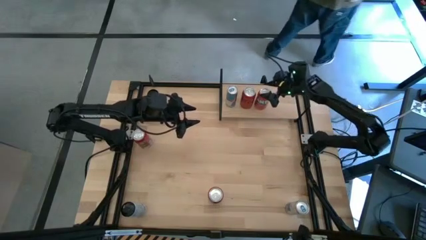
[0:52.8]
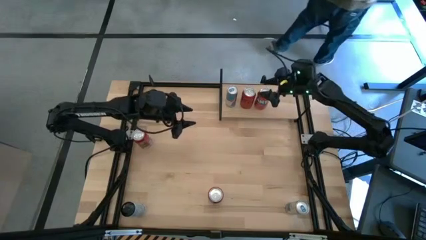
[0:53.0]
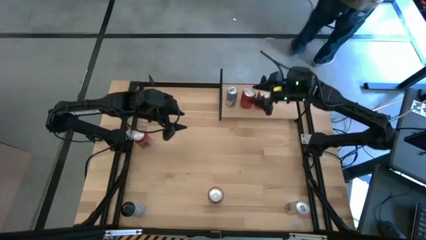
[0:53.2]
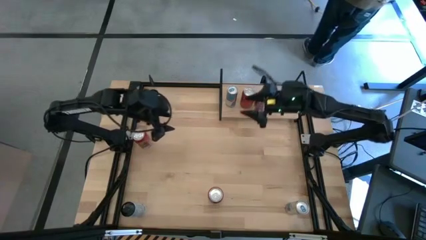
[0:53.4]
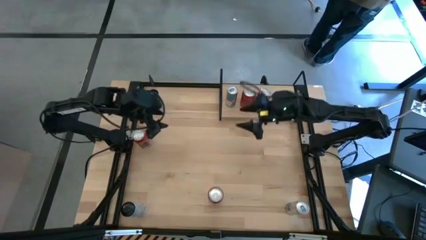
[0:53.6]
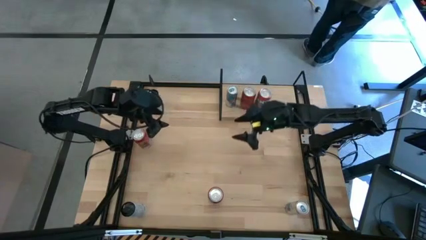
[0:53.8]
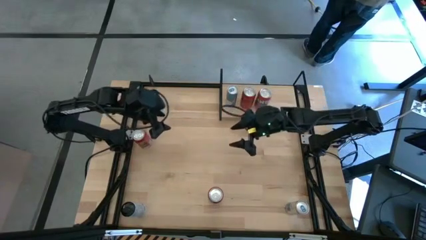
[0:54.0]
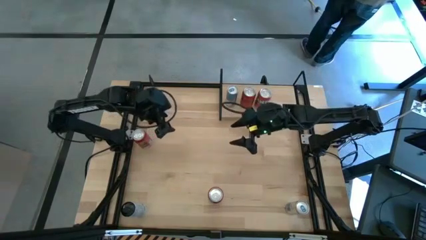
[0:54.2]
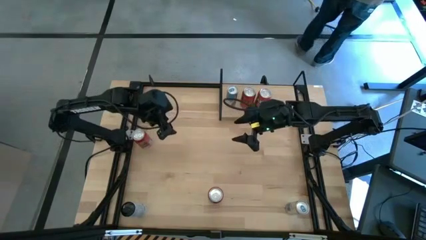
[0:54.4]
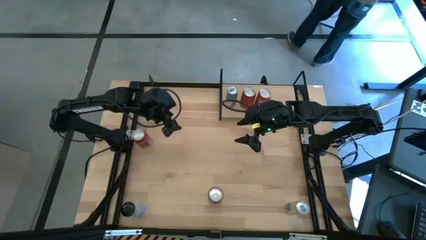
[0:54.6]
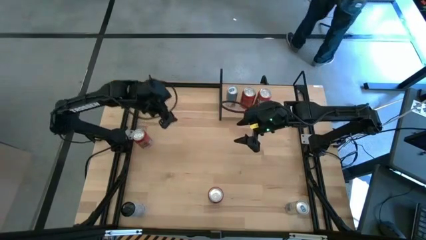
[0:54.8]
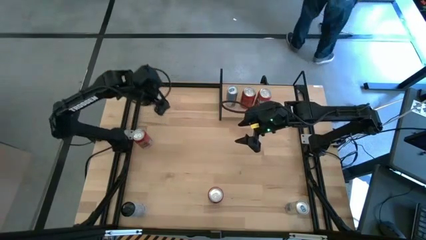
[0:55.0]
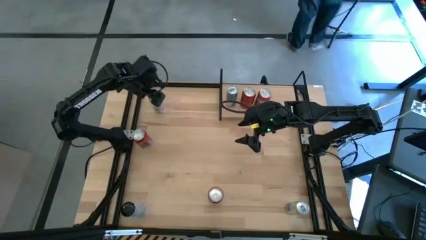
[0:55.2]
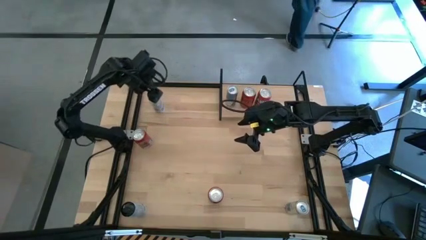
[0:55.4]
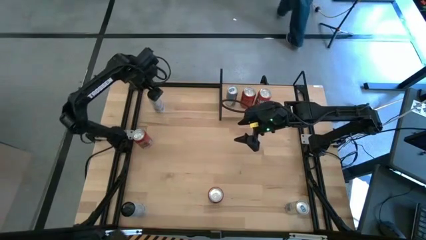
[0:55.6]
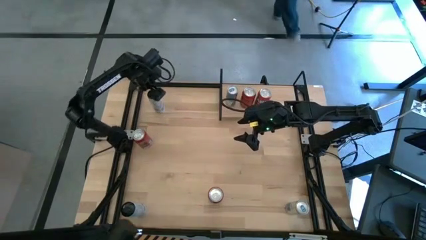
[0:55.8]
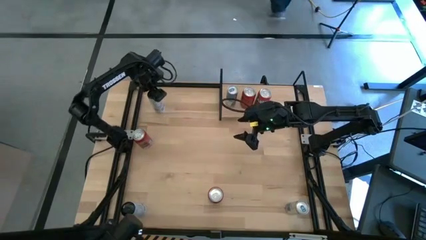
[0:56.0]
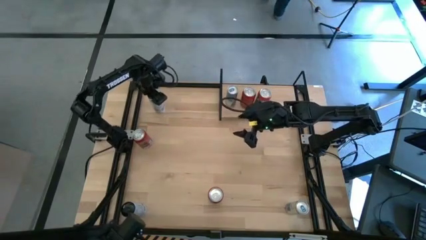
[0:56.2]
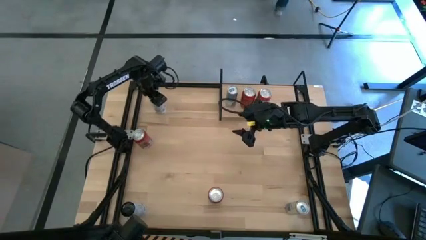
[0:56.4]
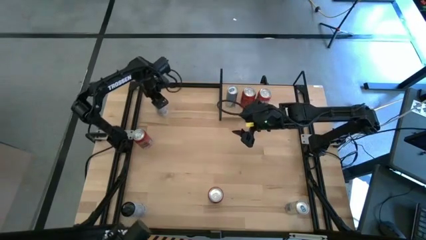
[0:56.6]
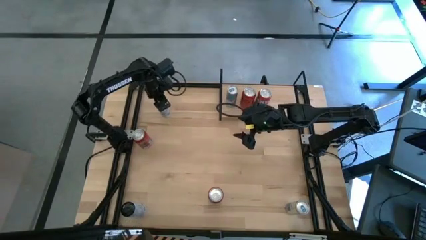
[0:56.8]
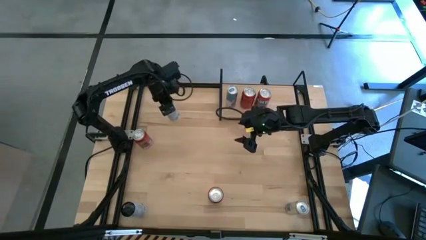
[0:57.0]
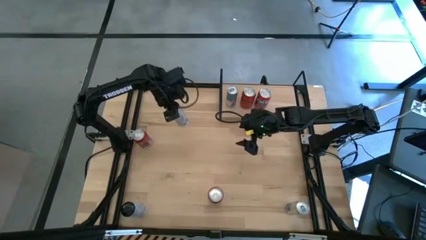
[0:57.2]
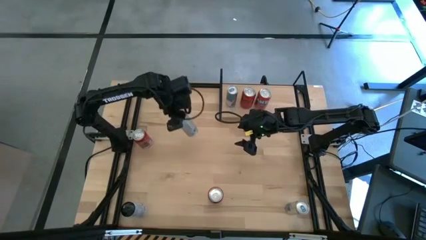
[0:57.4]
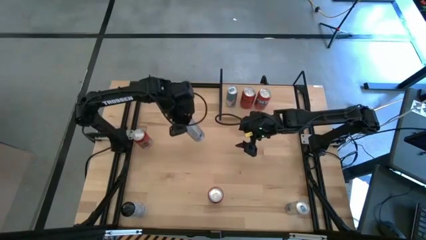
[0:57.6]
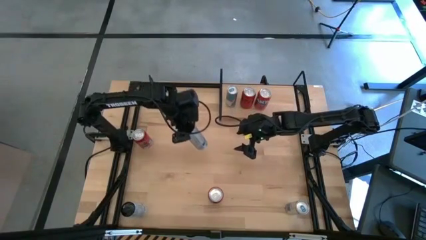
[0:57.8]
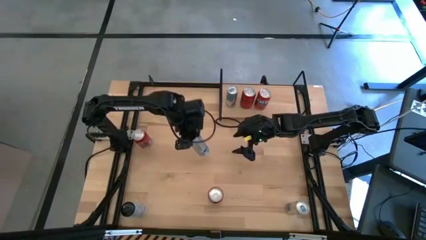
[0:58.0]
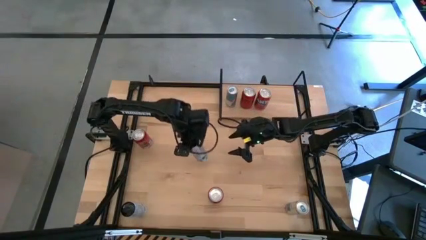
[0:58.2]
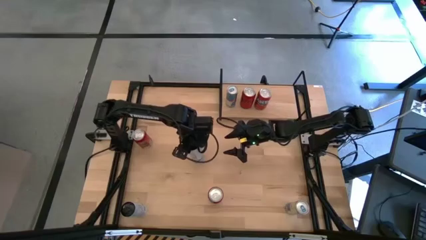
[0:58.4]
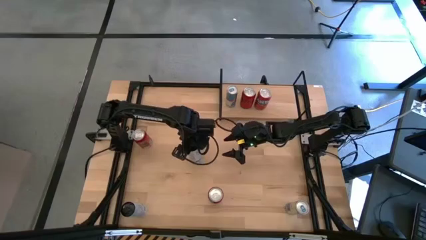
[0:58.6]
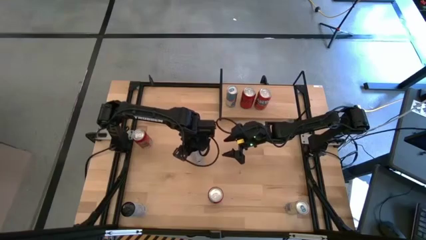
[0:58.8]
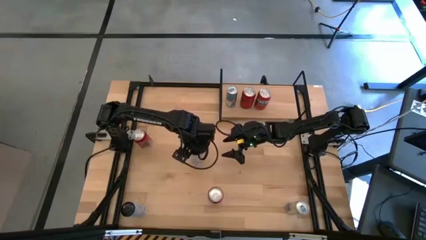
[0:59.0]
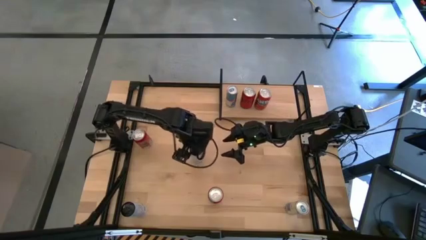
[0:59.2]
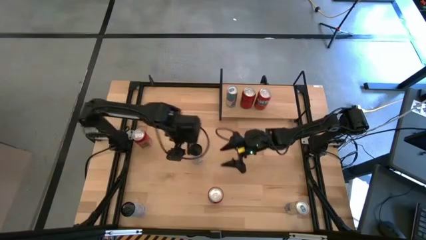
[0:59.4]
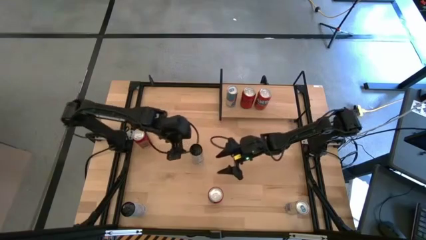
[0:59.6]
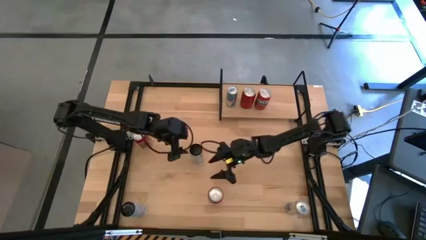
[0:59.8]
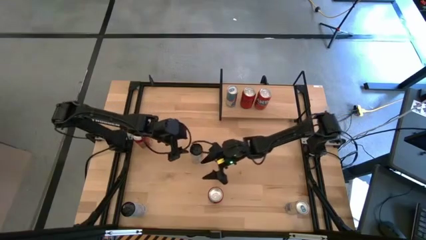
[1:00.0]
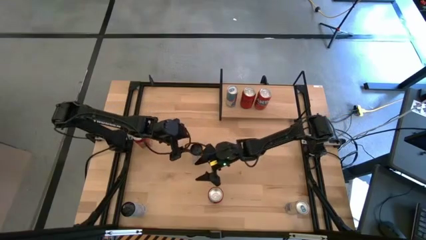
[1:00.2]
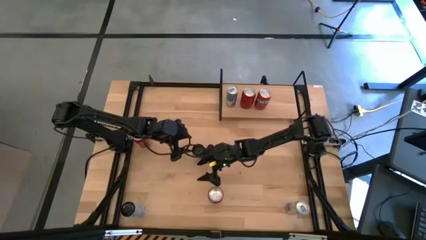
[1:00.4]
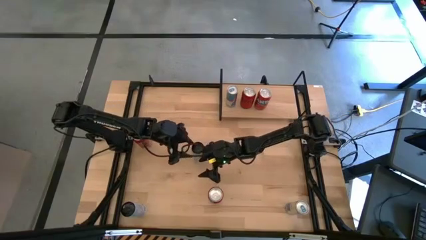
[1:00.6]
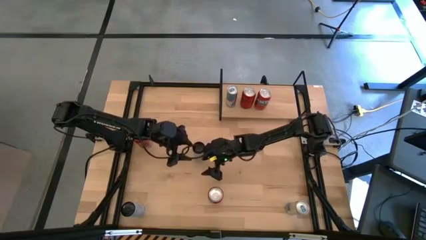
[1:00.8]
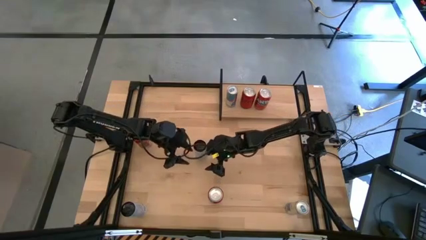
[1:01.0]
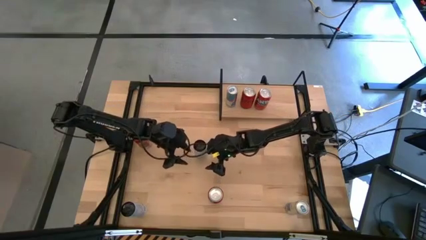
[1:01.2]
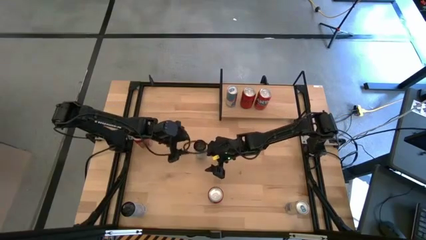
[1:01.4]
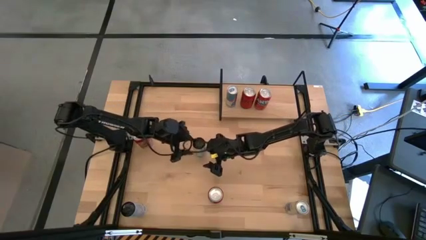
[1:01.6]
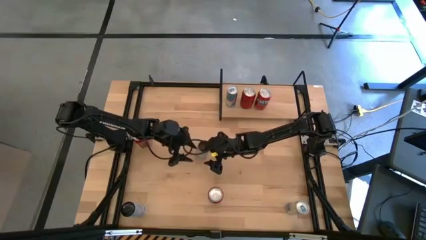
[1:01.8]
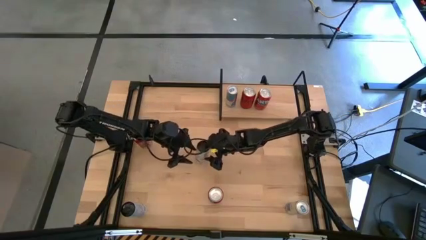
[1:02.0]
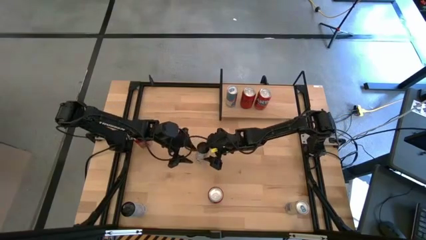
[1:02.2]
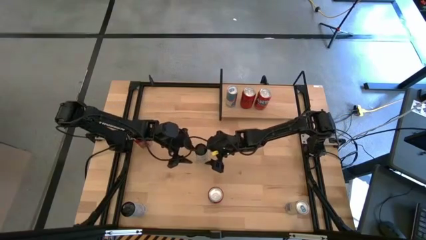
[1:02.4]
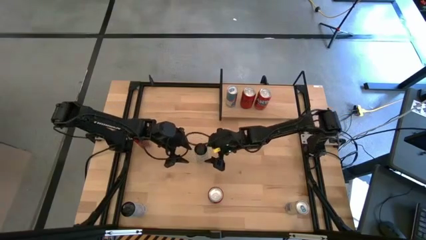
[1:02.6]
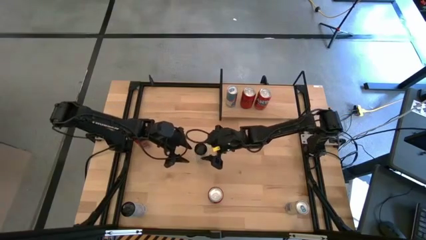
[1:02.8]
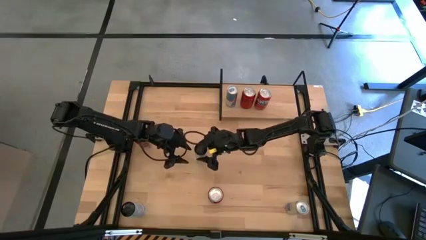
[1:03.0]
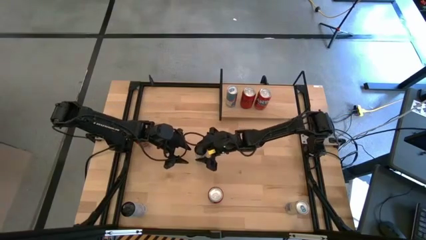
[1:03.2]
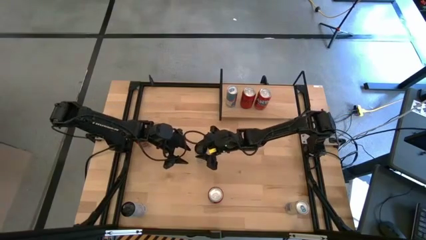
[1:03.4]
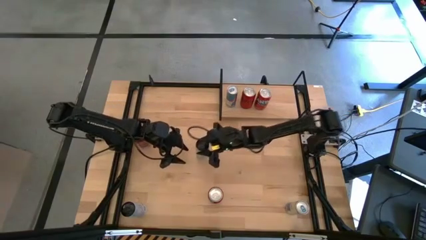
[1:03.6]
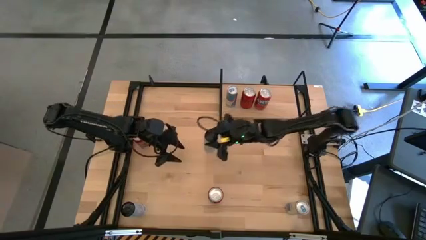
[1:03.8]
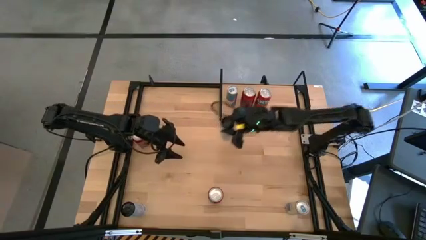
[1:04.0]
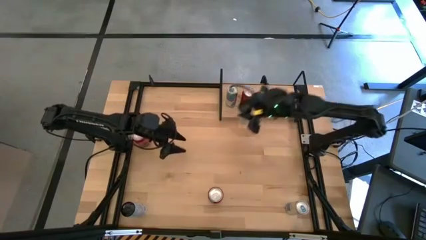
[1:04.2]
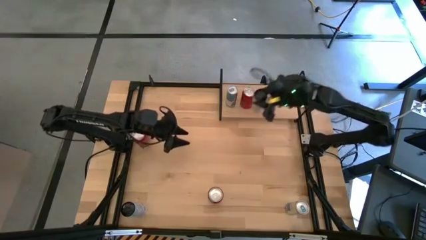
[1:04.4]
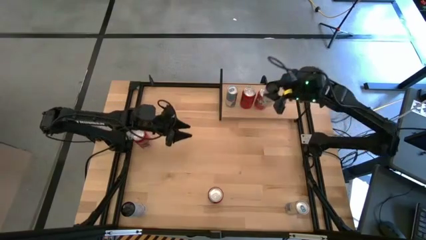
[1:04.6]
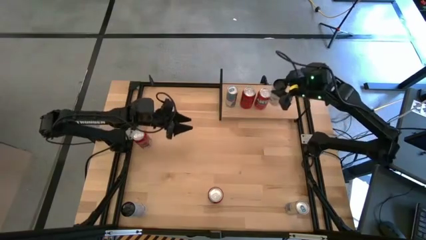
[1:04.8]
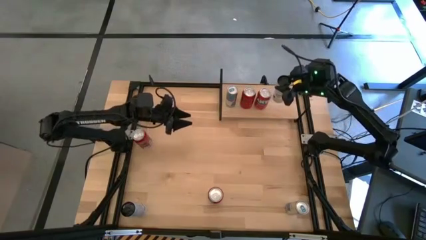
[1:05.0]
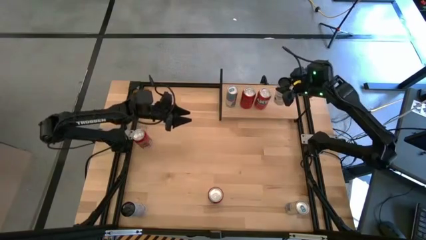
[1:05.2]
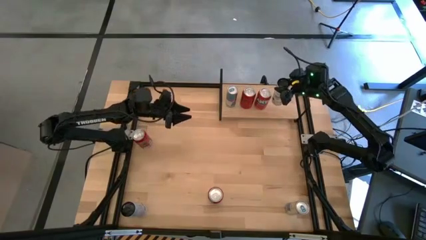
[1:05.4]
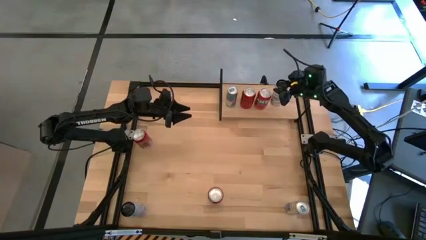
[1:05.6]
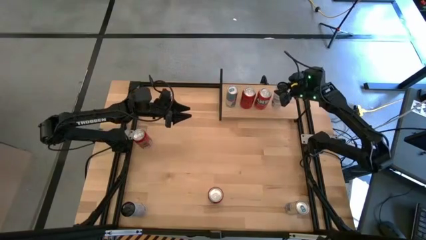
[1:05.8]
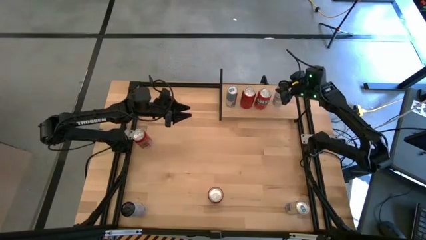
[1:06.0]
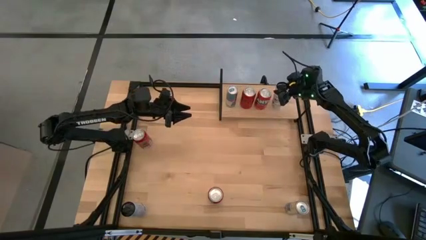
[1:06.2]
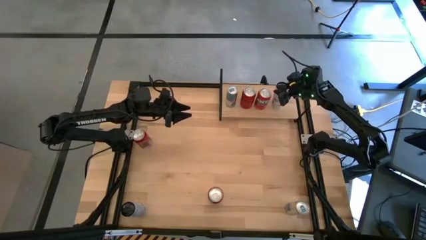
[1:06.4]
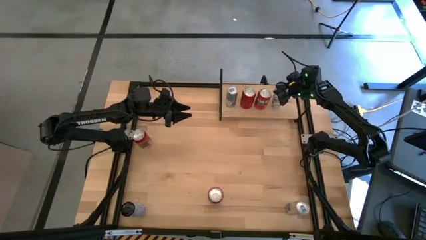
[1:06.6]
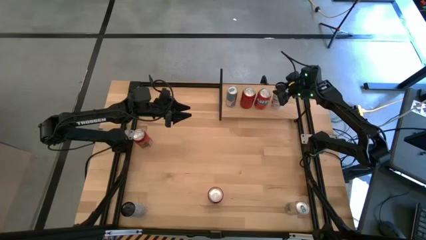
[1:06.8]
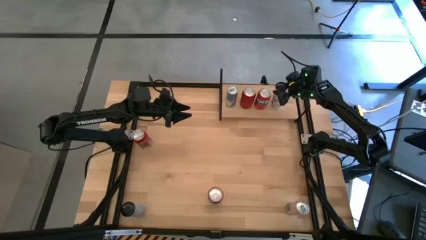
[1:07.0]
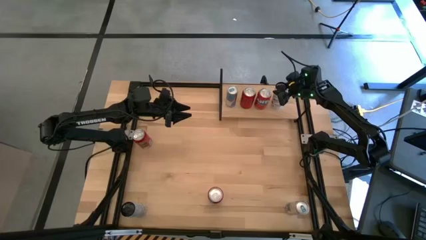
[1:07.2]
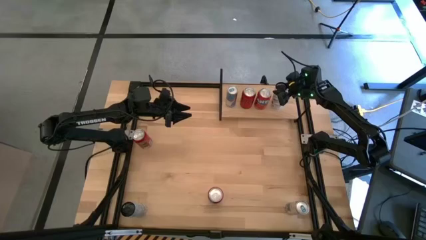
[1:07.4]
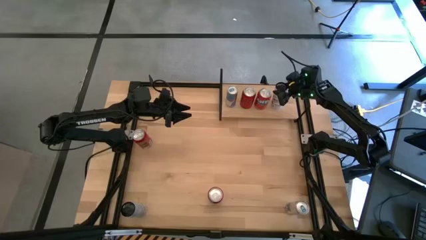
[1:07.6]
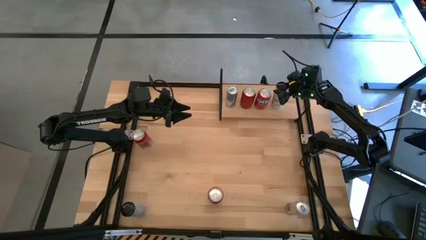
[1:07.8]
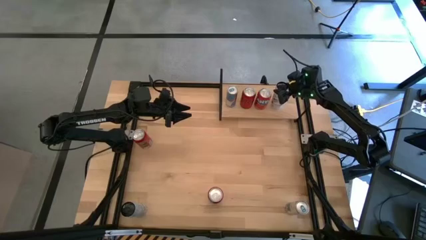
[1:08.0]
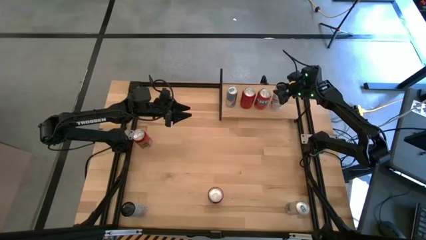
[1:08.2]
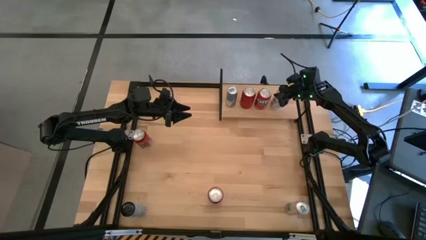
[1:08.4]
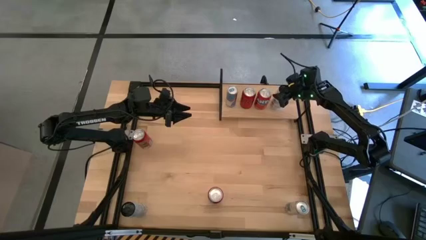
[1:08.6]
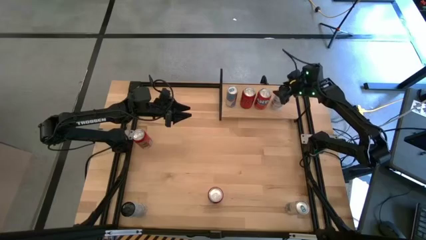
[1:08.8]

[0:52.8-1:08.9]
Task: Place canned beverage on shelf
Put the top white-blue soda can on the shelf
